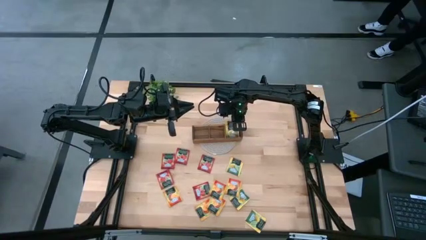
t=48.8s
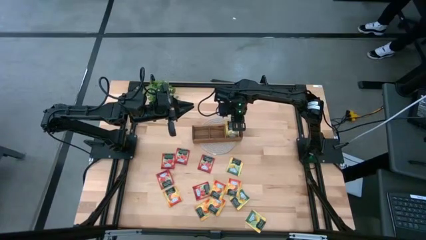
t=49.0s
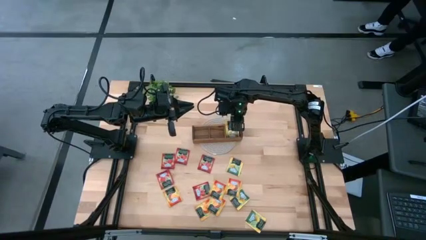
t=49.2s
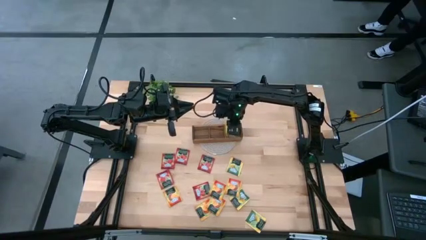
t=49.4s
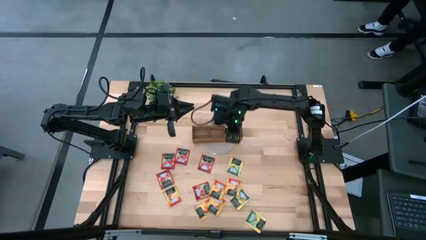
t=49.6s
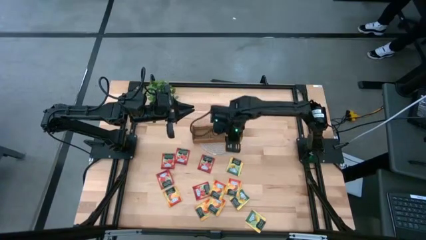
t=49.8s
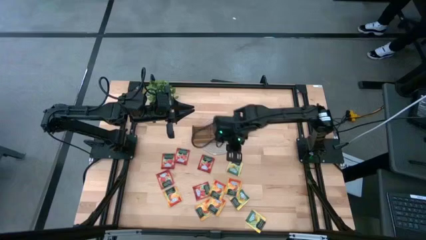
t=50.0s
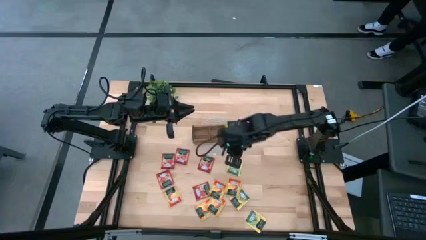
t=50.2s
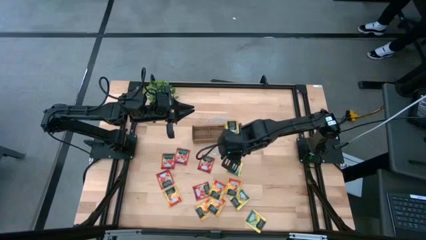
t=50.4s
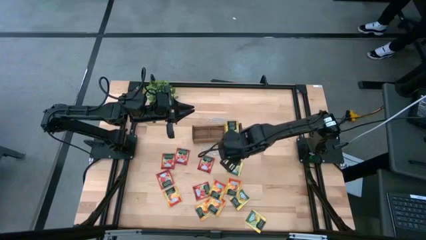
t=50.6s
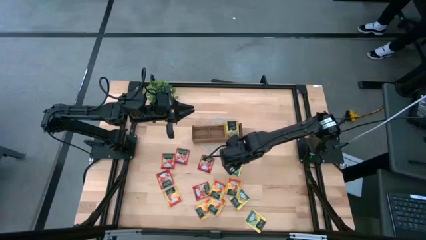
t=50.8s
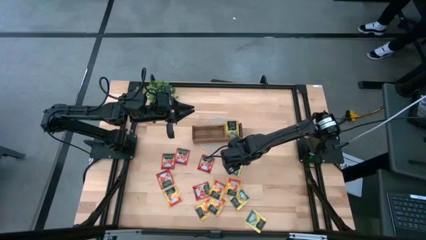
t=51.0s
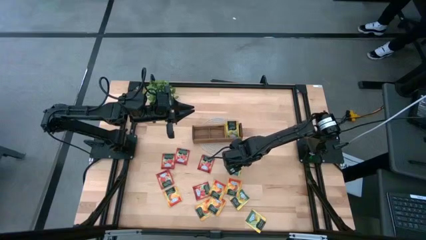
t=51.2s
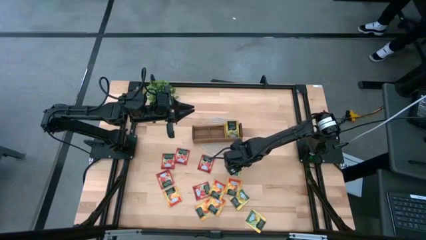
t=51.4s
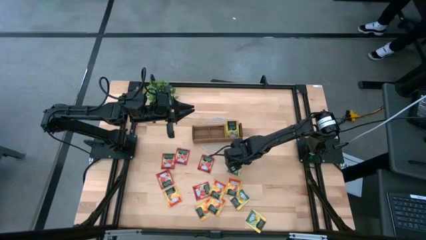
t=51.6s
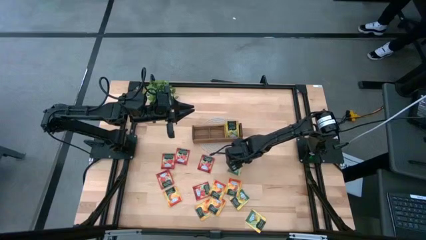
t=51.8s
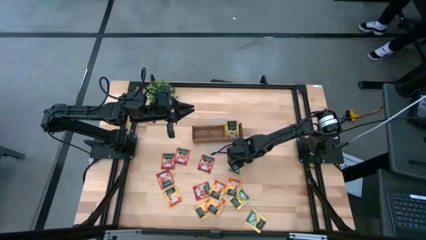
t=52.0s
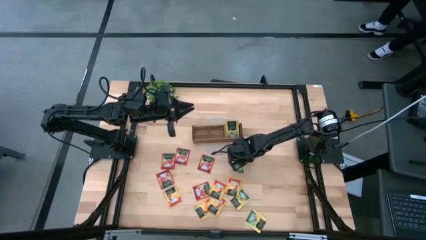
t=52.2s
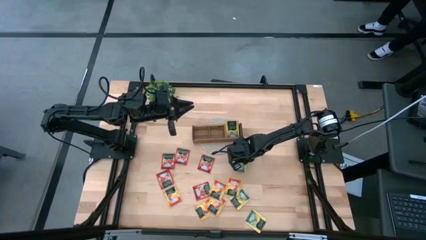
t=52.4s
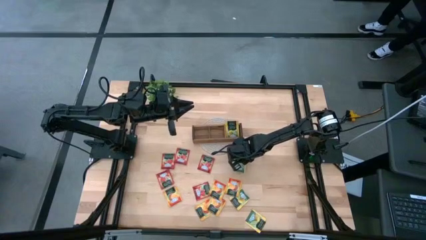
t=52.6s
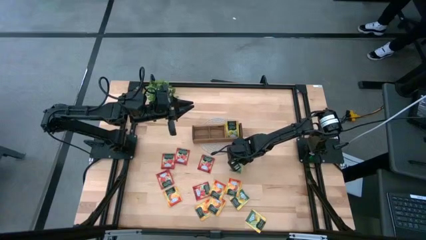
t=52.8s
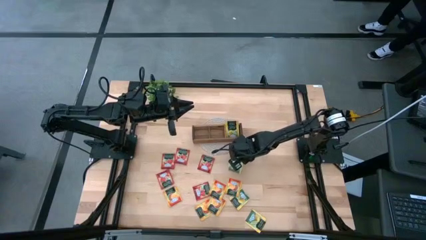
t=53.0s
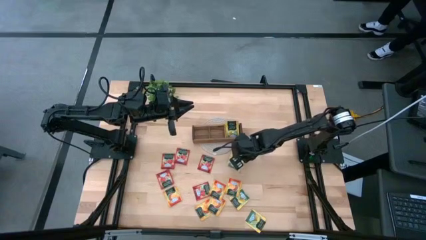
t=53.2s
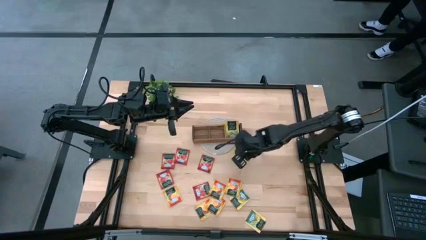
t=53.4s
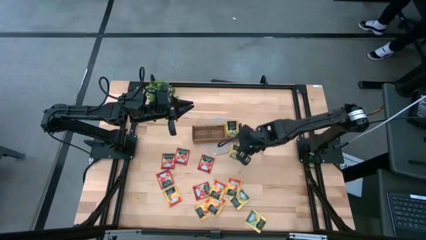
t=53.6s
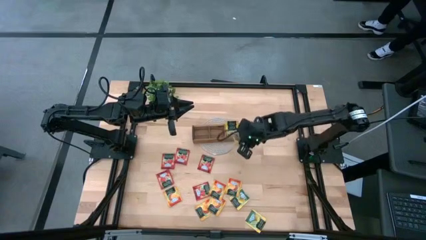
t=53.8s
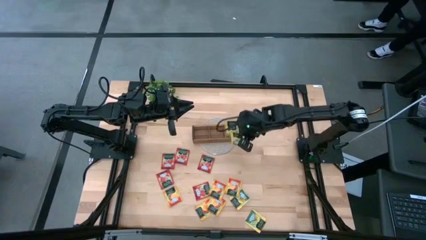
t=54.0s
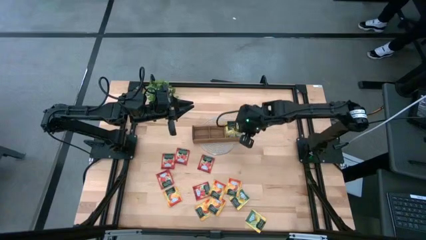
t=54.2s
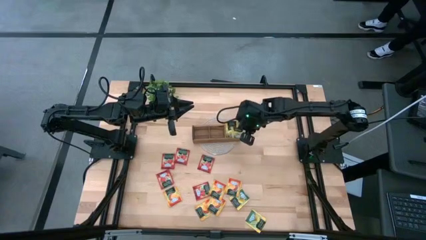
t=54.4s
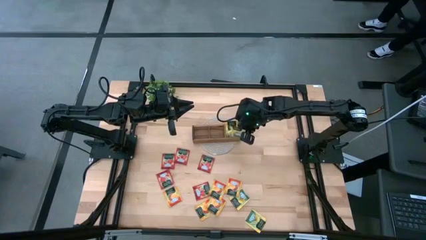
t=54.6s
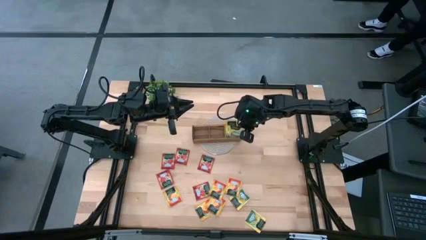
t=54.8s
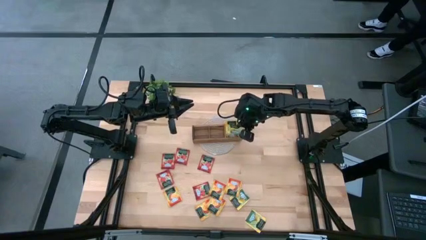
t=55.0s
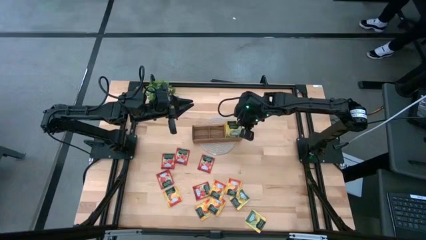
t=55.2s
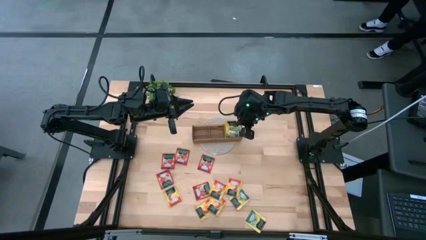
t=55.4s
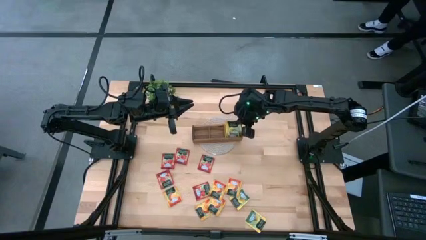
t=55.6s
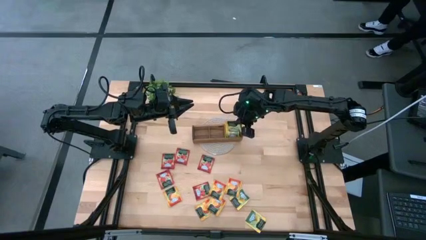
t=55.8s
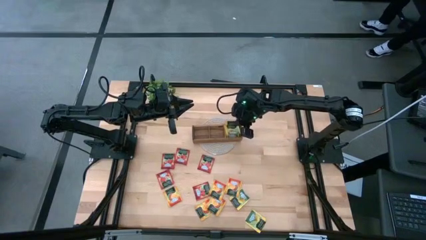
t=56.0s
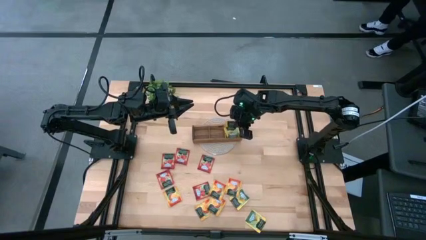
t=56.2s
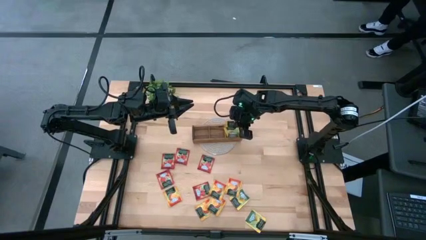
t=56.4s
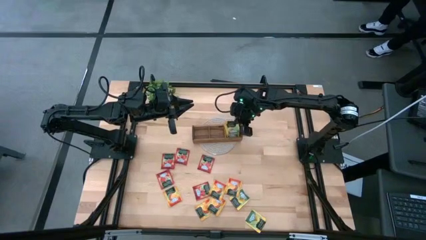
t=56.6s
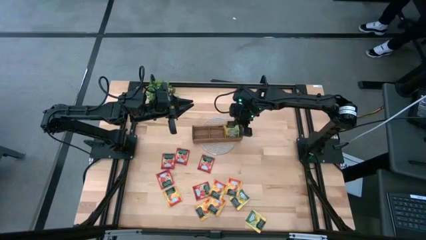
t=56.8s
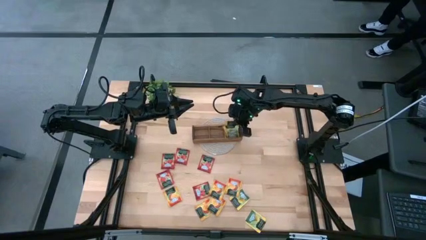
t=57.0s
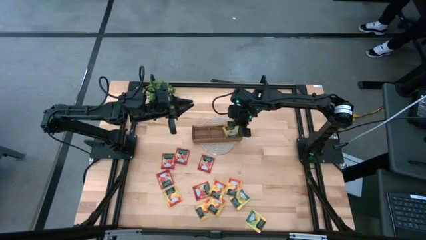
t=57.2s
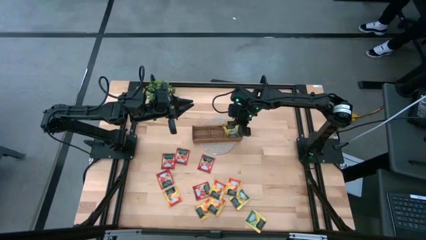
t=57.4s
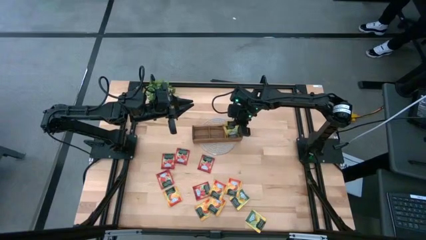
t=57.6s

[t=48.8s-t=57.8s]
Task: Pick & Place Tea
Put the yellow tea bag into the right section of the wooden organizer

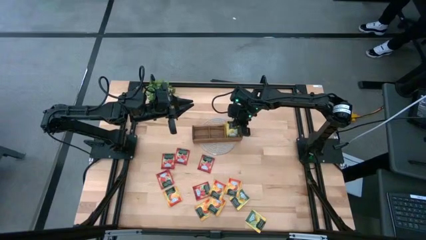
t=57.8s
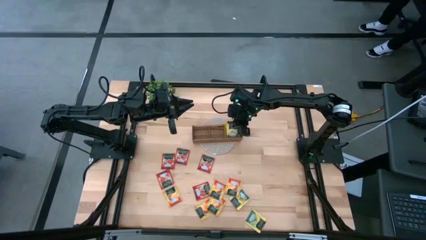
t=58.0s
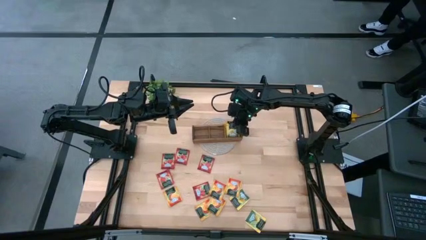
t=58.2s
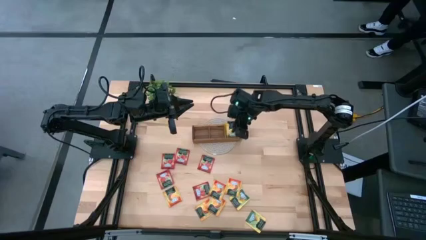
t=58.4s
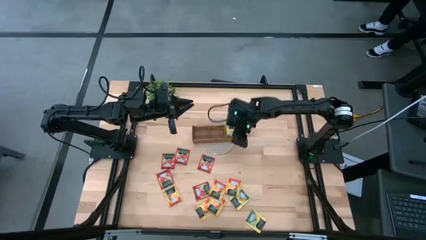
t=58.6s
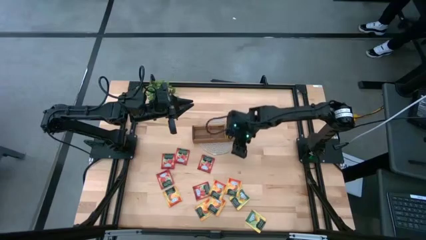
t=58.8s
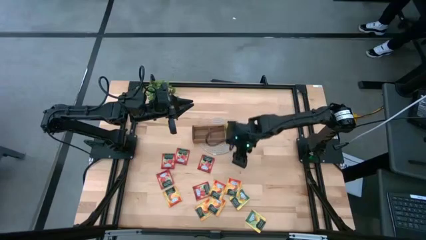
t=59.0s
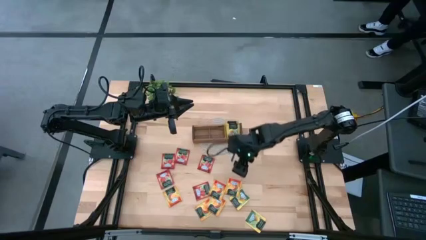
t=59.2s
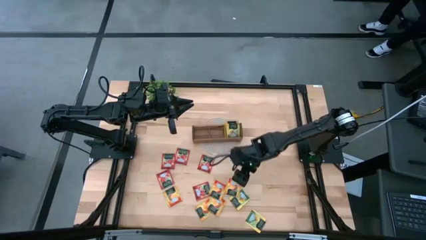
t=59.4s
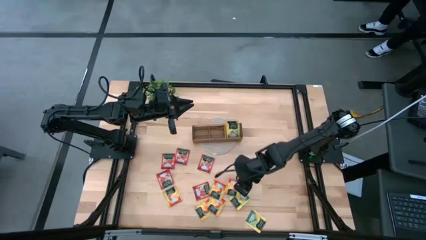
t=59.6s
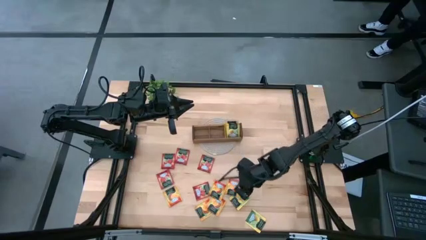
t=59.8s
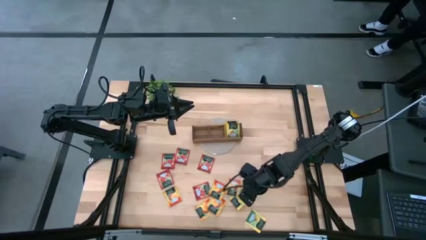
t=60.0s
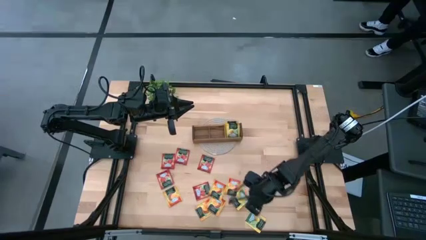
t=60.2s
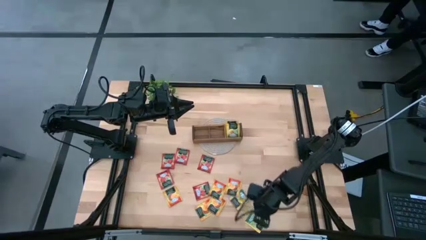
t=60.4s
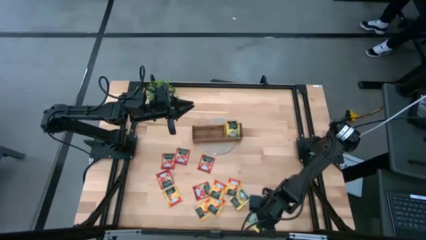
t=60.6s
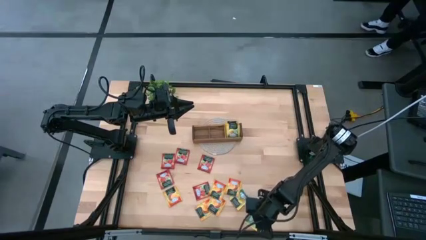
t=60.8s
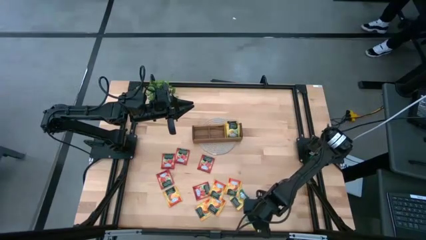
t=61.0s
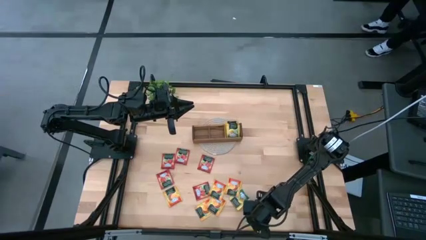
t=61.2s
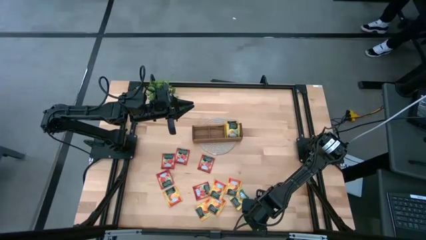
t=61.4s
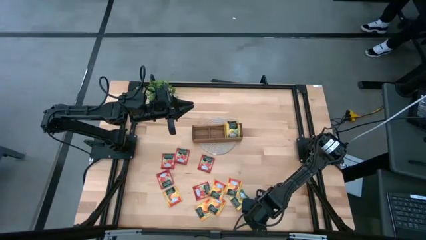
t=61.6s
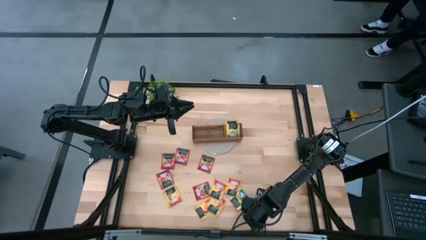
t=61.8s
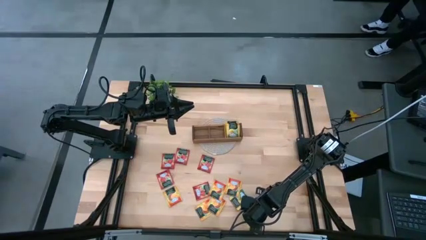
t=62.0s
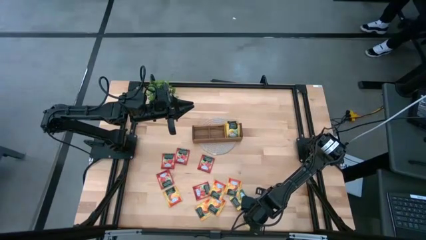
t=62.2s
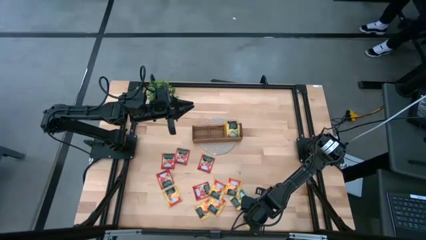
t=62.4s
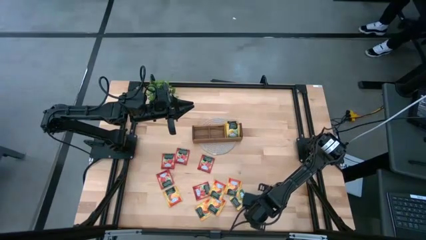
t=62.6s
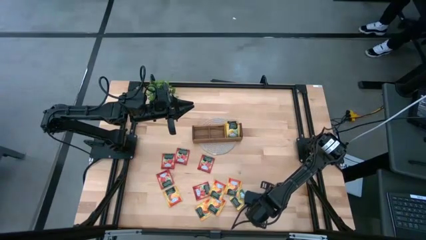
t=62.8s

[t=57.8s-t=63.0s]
Put the yellow tea bag into the right section of the wooden organizer

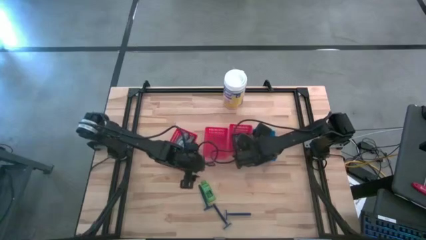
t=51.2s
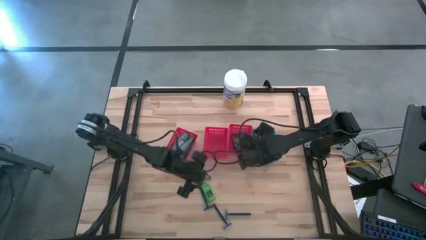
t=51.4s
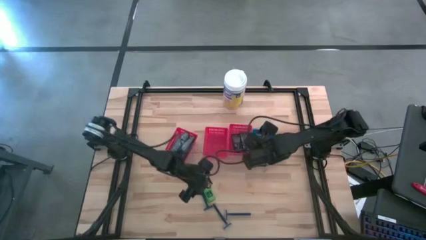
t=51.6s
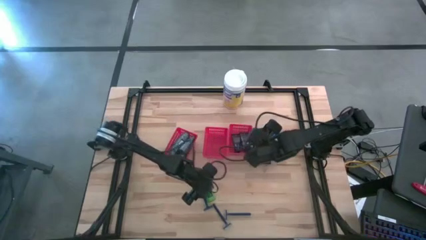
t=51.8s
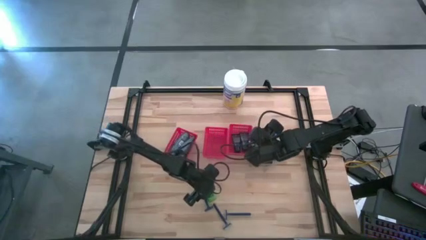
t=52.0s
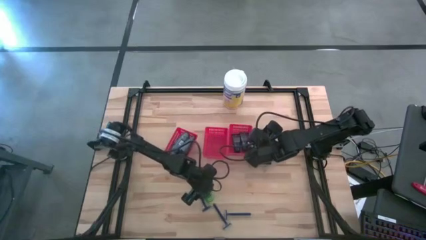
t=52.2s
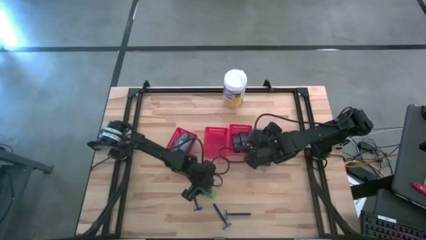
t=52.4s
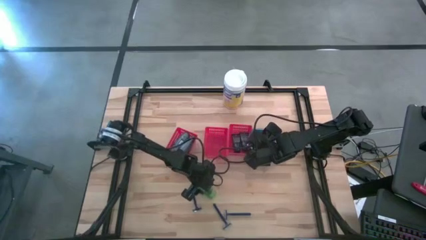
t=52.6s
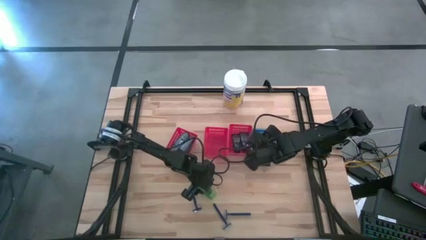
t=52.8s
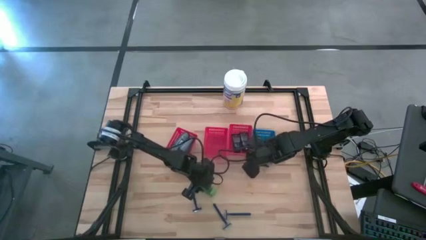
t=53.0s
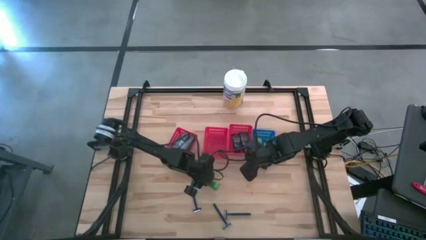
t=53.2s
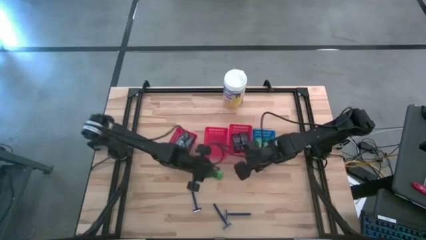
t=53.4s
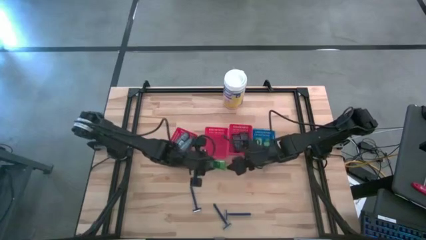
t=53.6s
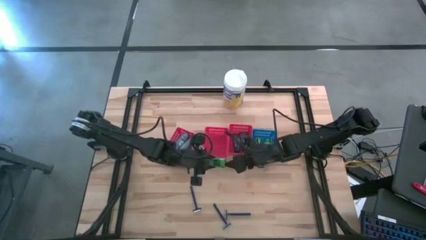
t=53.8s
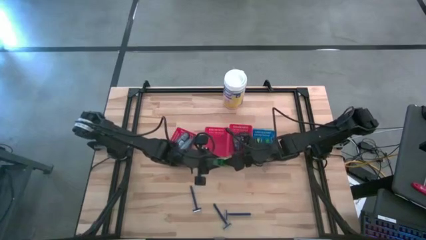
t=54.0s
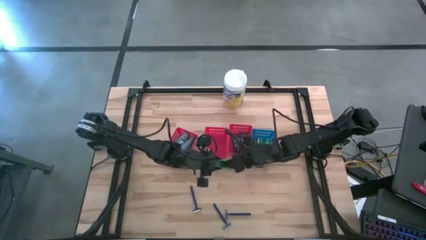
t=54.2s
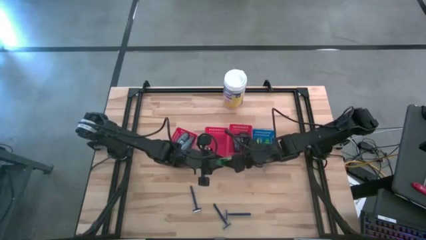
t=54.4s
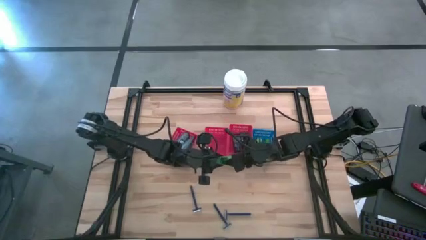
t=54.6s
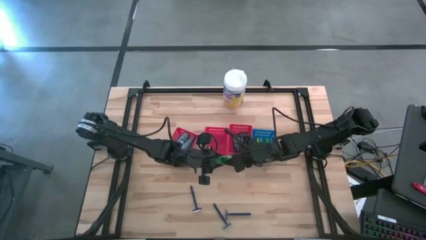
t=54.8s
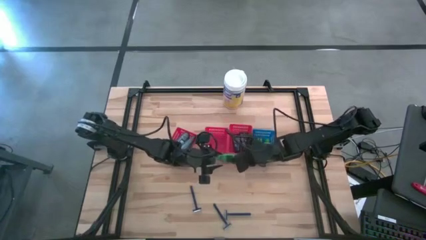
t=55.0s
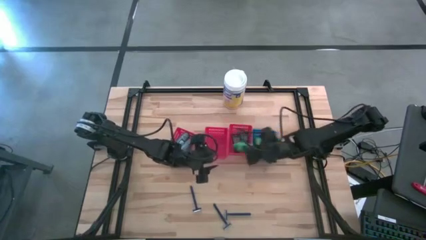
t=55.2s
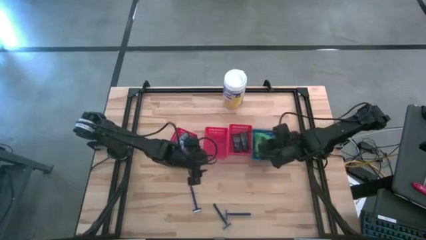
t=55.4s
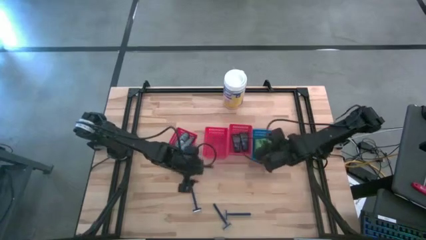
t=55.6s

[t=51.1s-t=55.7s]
Task: Pick & Place Travel size toiletries
Put the green shampoo into the blue bin
